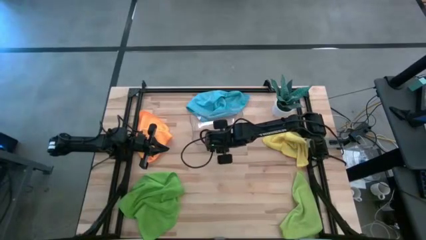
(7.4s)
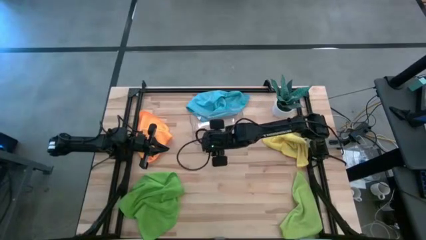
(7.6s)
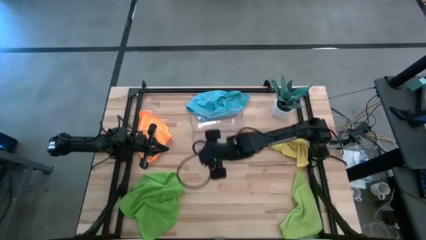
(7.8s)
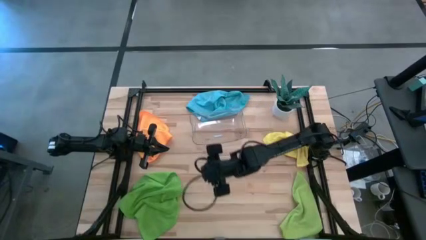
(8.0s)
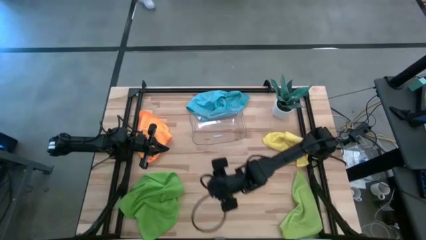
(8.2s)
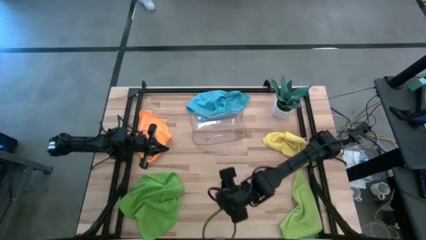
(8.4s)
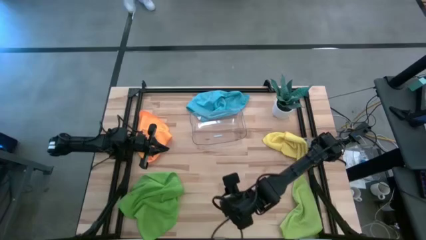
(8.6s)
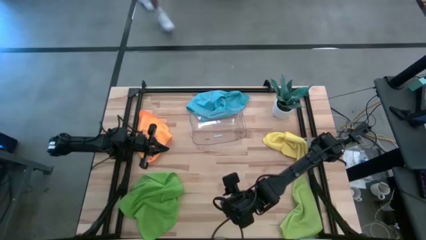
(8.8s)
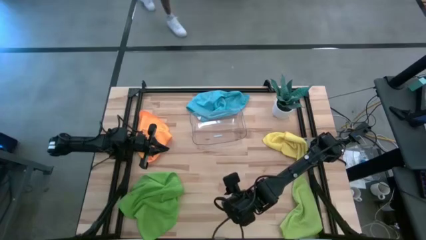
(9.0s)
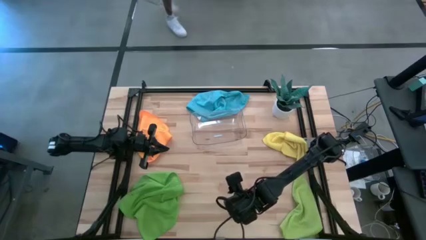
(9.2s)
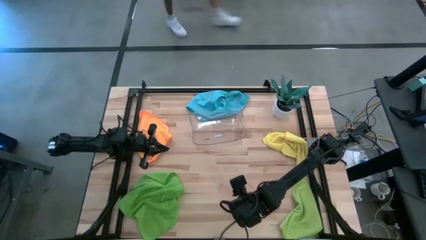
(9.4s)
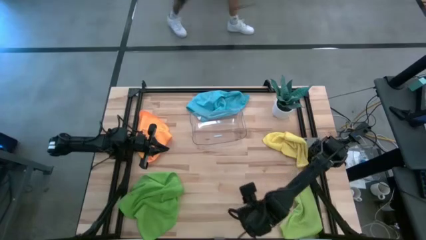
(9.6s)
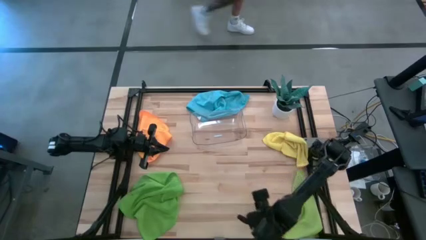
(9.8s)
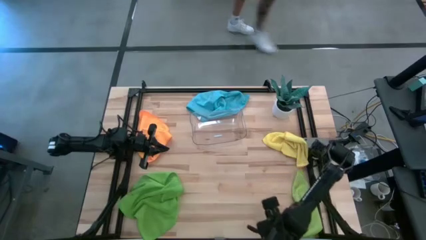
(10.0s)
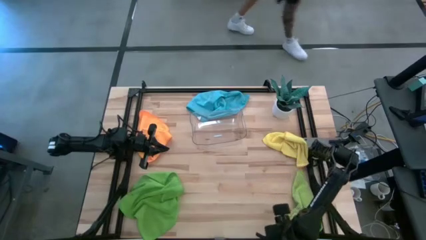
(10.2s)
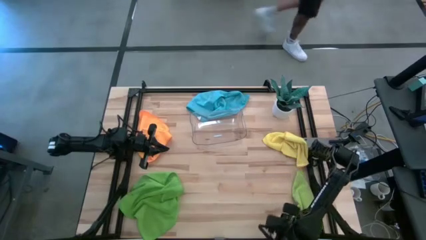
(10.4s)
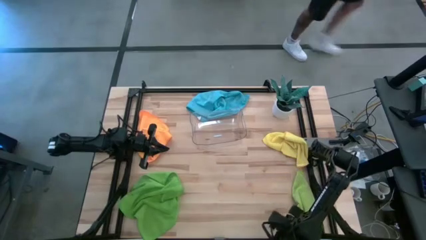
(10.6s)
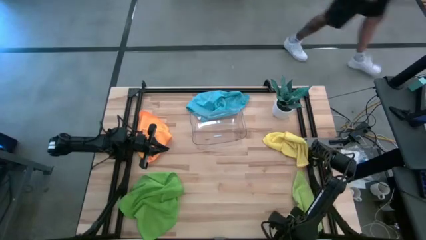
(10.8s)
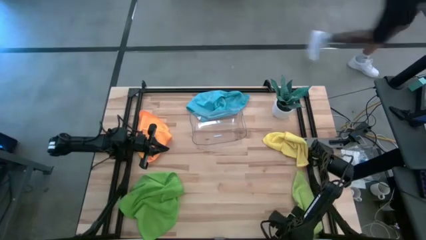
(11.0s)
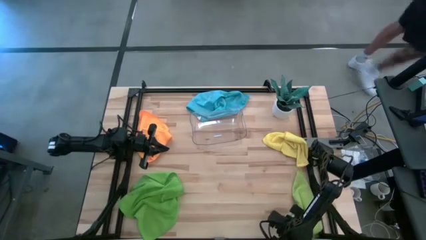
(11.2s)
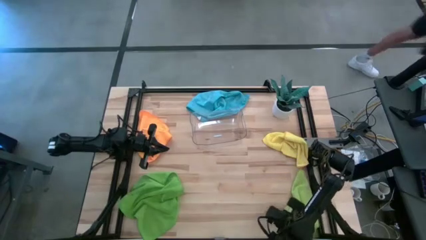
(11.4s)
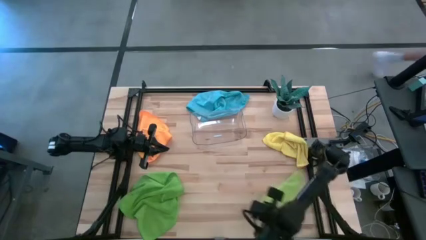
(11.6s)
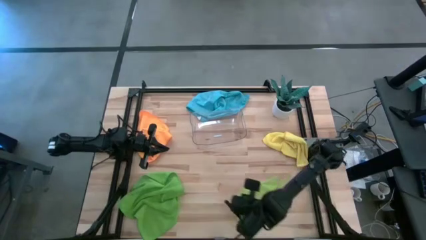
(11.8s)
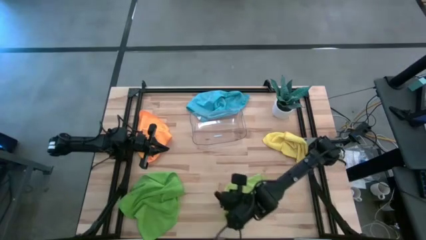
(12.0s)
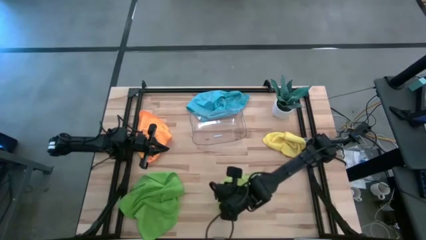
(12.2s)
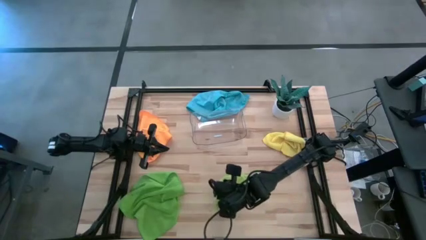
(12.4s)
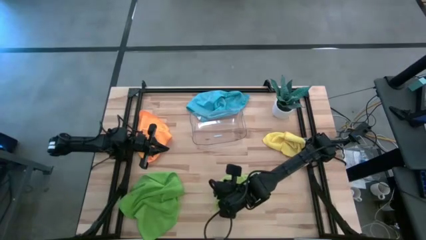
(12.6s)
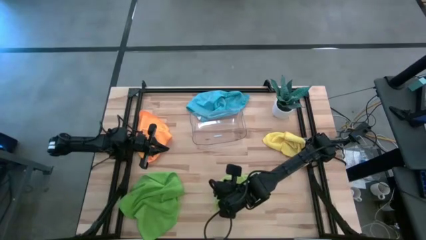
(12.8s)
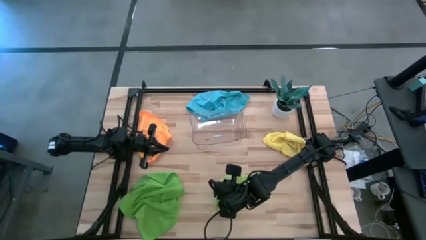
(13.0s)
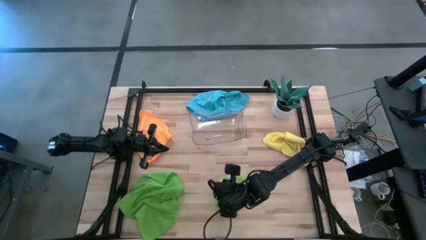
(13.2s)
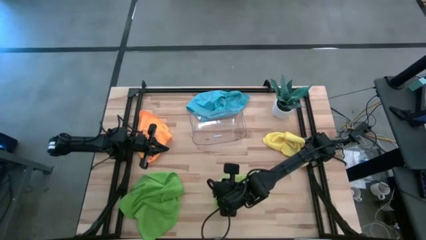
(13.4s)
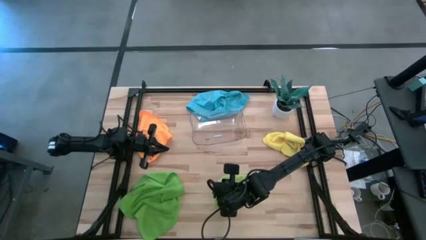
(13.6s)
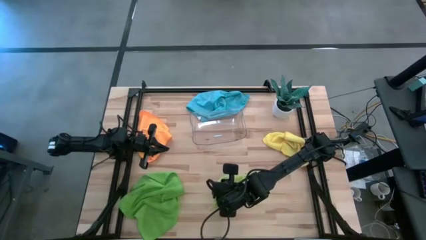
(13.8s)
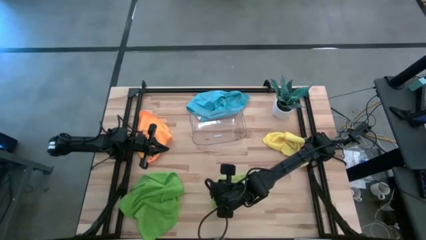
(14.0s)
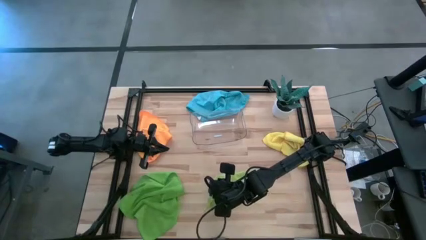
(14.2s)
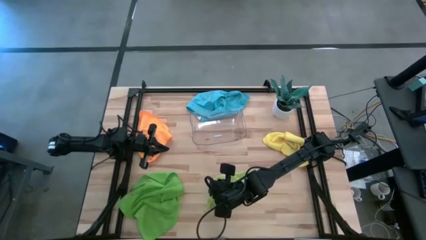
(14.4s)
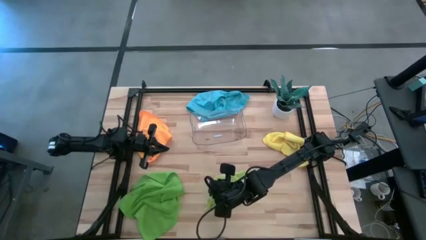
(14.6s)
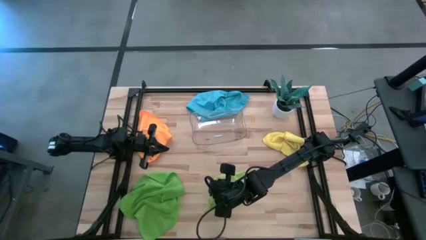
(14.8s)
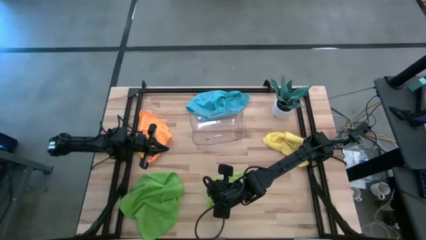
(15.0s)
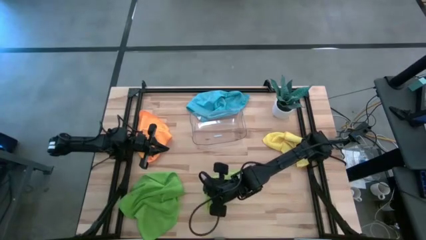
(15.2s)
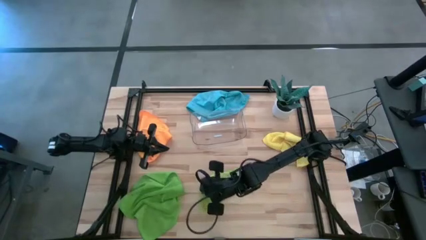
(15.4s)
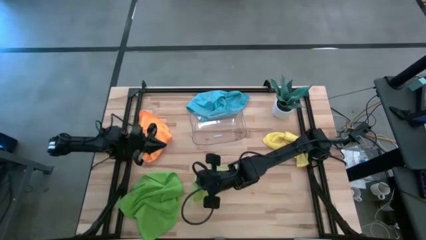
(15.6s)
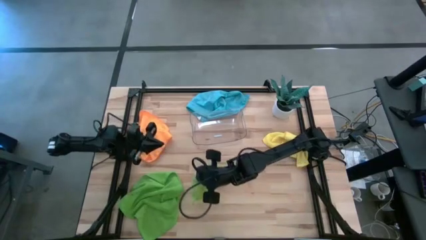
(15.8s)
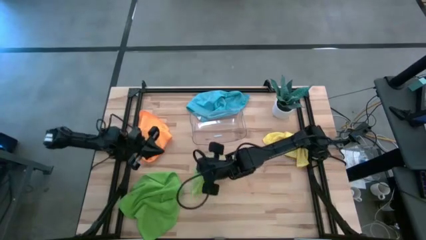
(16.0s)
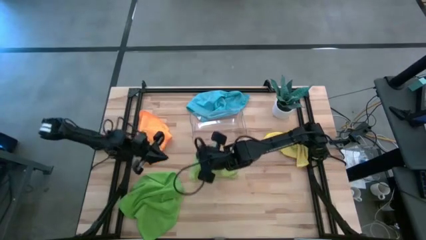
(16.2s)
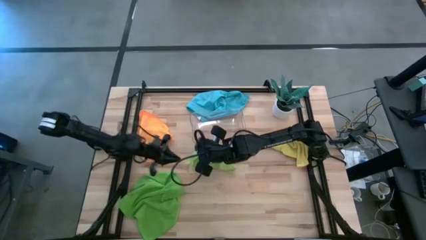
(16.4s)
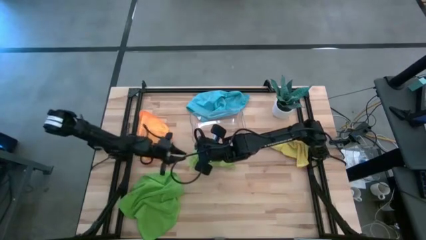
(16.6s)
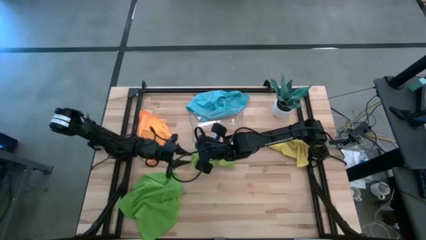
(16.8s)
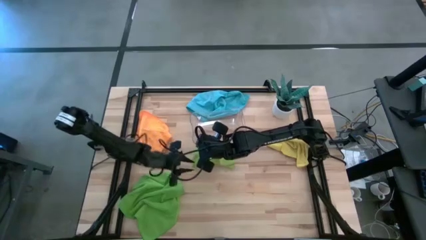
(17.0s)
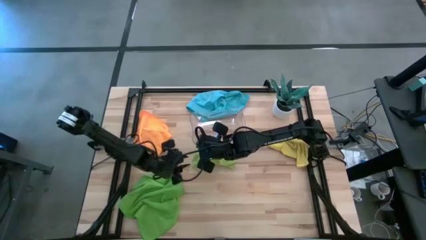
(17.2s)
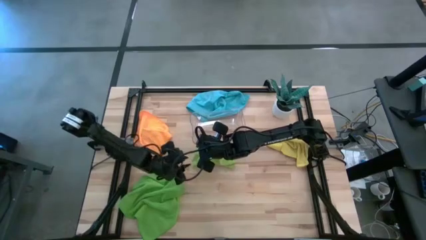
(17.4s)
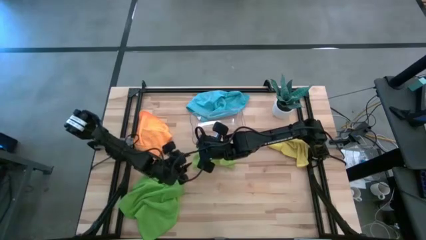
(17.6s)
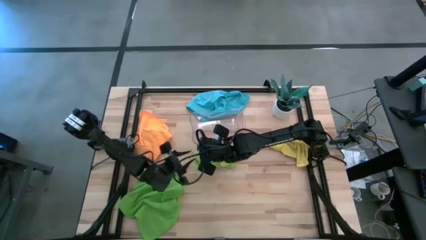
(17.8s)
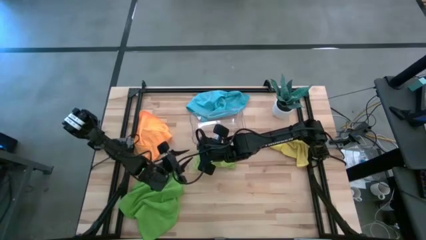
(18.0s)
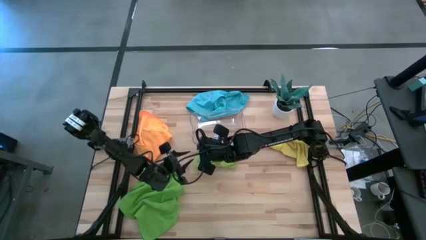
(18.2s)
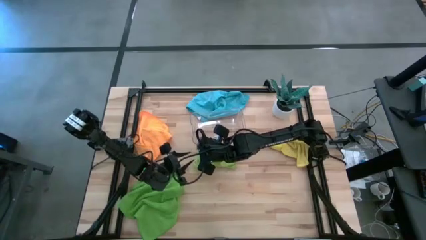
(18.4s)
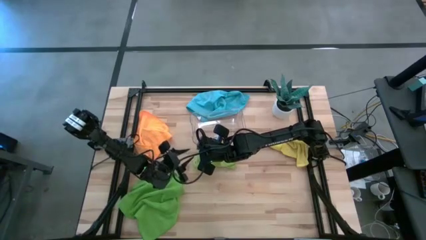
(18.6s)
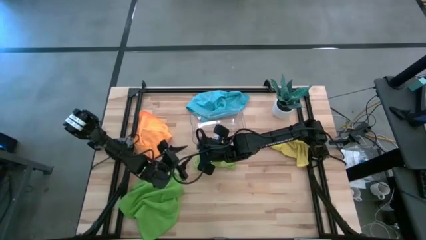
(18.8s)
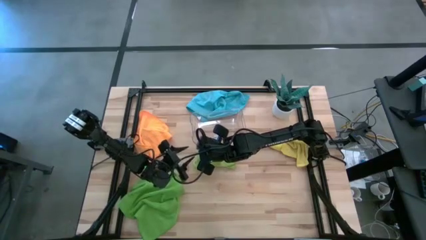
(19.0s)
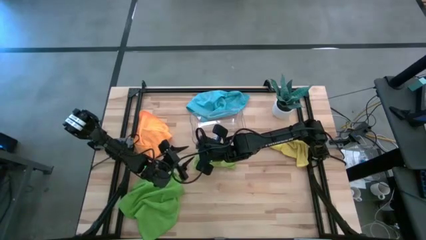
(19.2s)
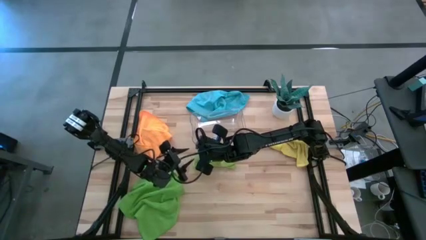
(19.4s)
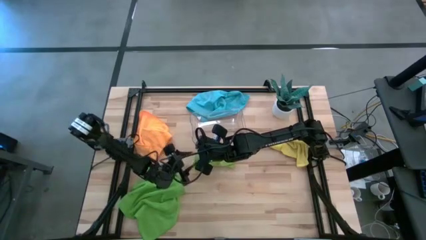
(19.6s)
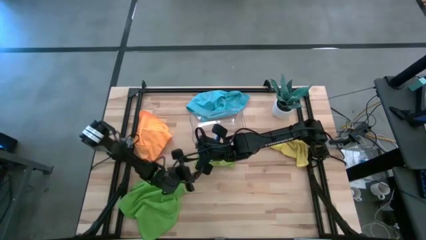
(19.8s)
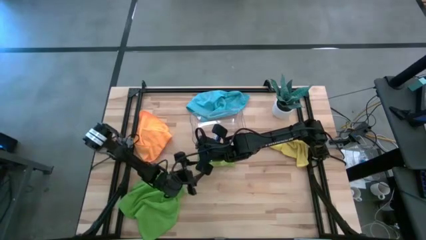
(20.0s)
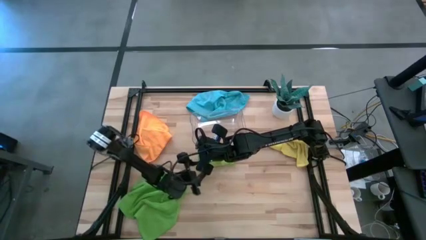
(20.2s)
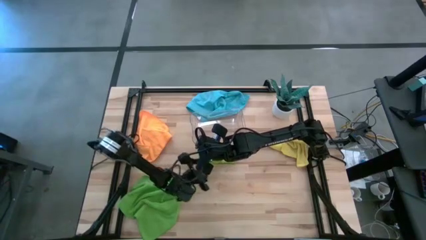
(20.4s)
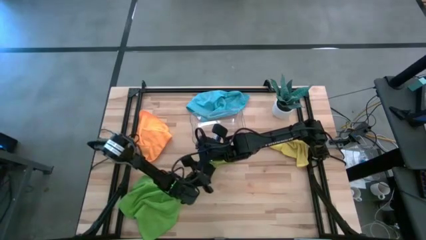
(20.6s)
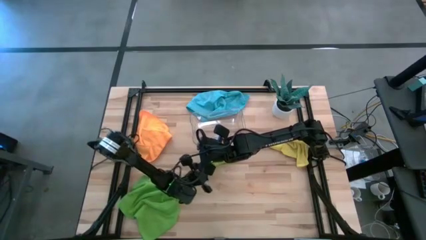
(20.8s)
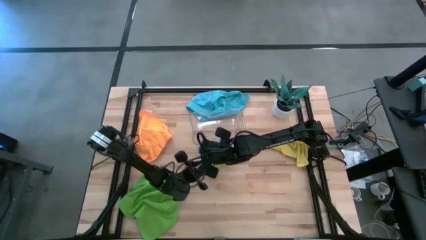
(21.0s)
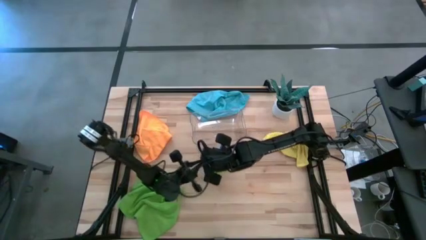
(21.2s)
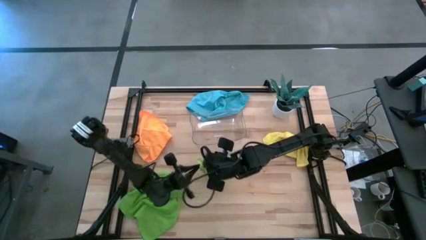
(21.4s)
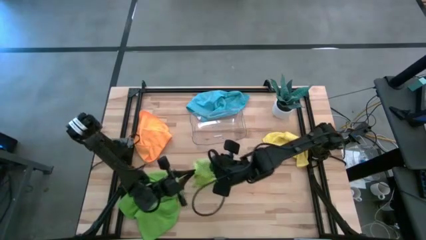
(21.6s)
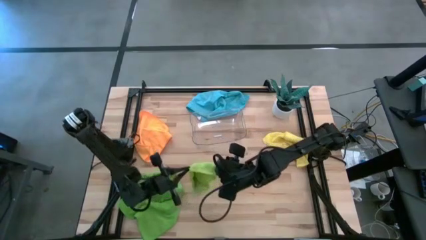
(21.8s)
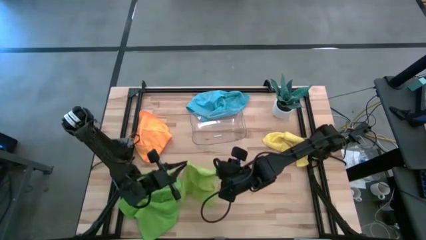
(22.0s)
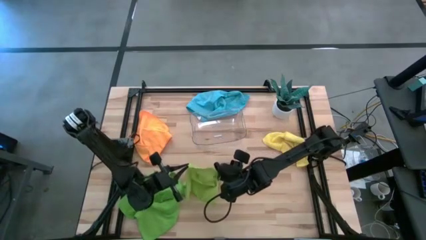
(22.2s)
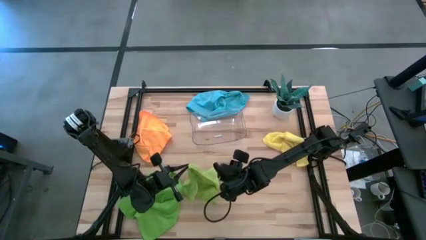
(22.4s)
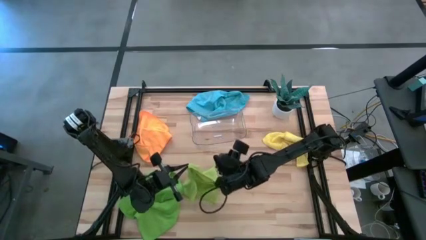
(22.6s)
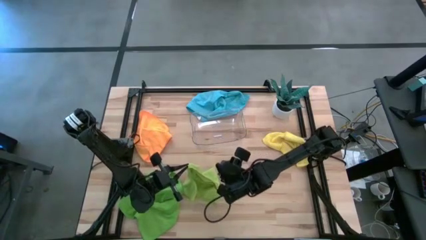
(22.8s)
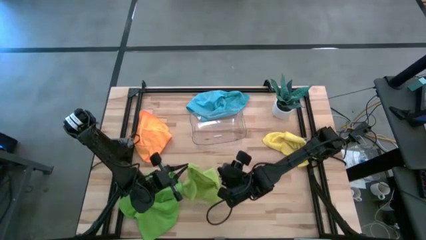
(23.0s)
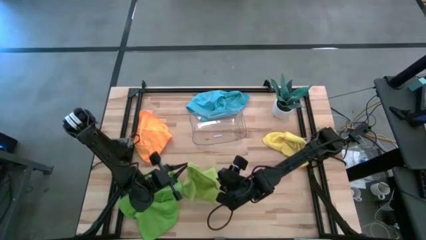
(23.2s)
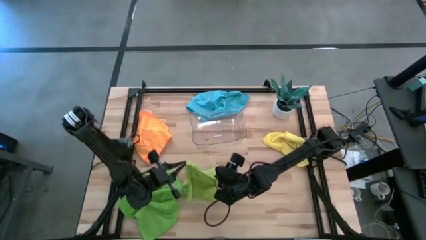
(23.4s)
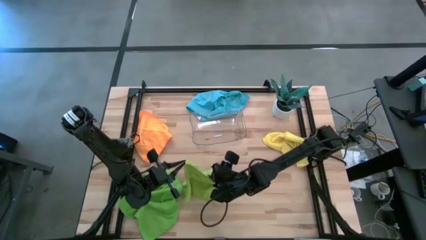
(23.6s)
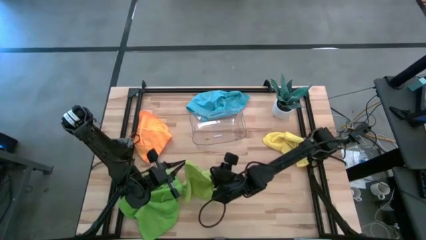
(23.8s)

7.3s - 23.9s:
Task: Fold microfiber towels
Fold the light green microfiber cloth
